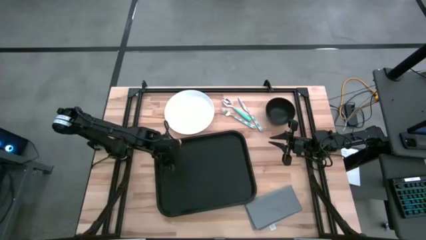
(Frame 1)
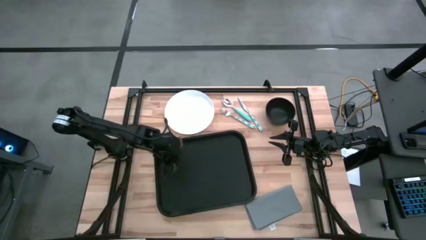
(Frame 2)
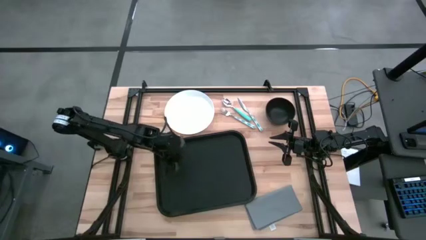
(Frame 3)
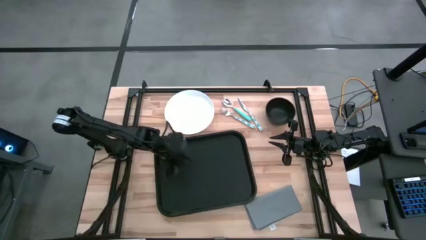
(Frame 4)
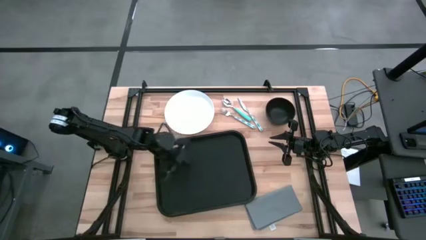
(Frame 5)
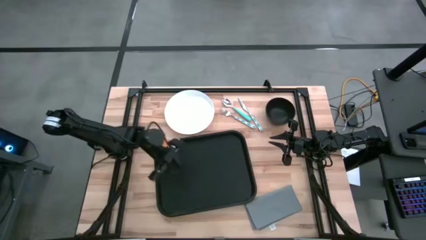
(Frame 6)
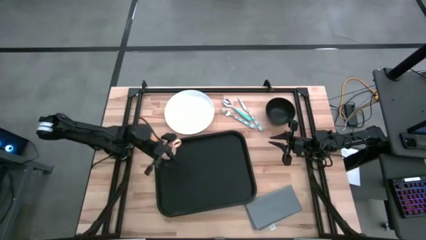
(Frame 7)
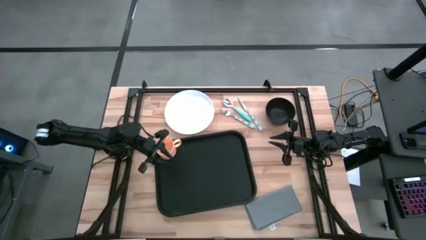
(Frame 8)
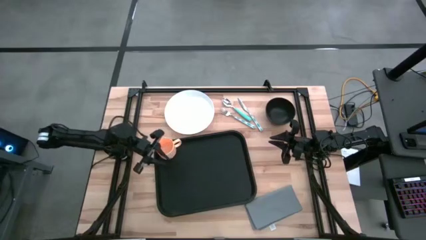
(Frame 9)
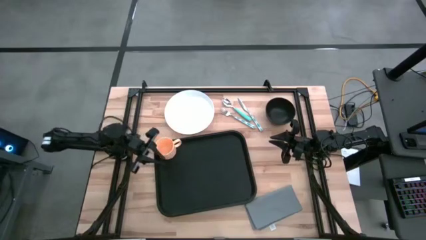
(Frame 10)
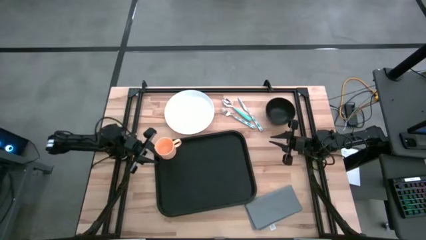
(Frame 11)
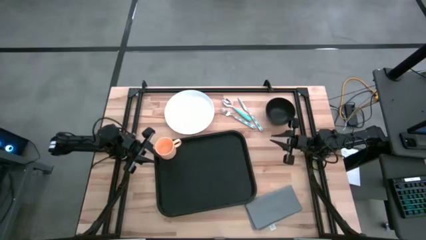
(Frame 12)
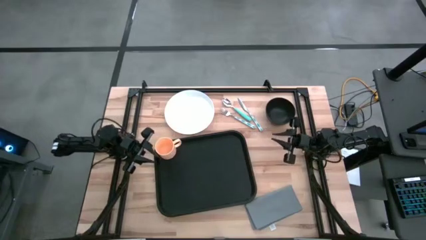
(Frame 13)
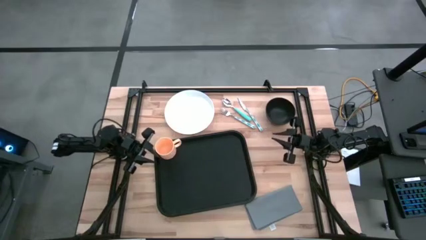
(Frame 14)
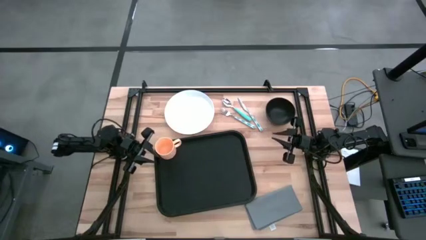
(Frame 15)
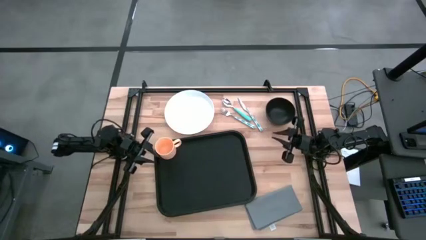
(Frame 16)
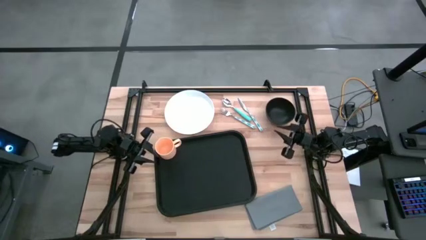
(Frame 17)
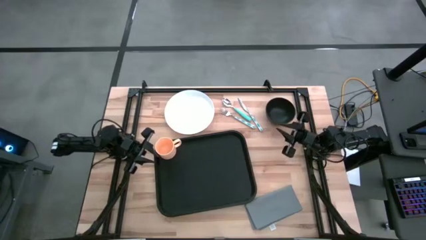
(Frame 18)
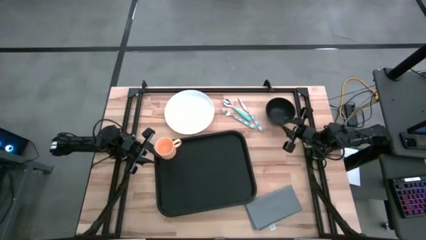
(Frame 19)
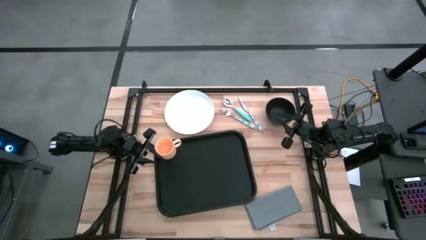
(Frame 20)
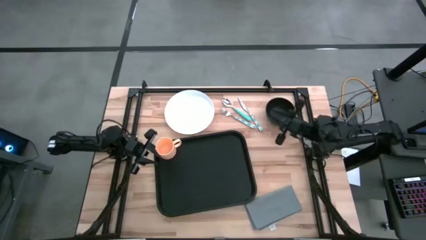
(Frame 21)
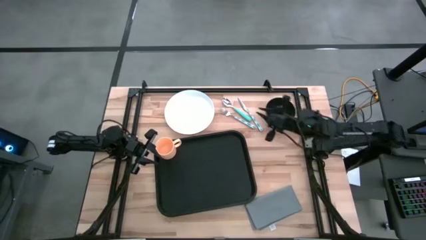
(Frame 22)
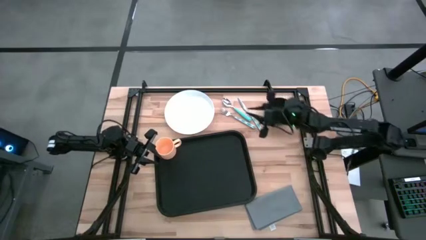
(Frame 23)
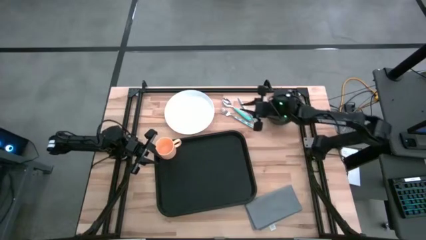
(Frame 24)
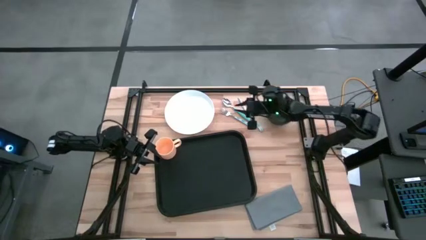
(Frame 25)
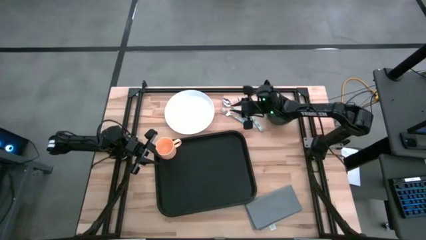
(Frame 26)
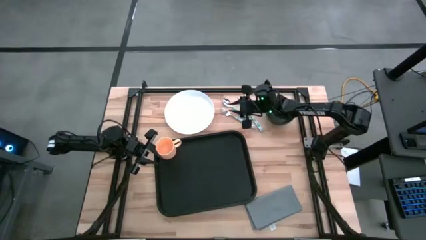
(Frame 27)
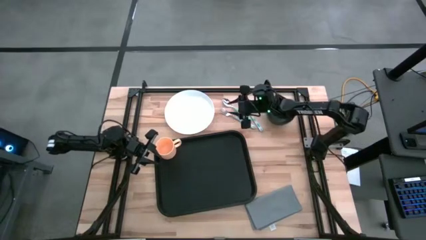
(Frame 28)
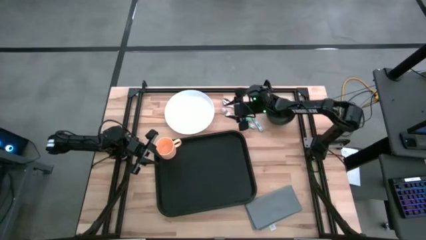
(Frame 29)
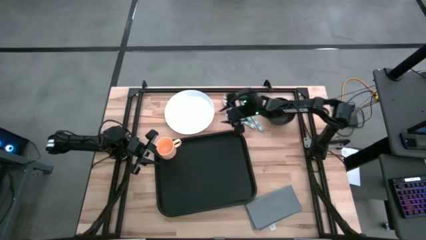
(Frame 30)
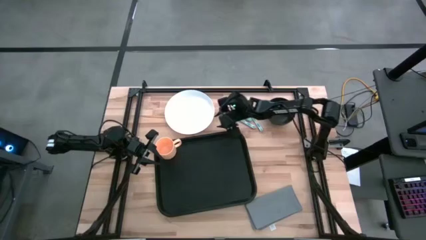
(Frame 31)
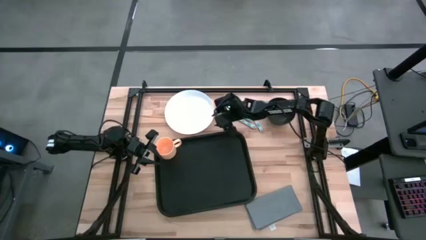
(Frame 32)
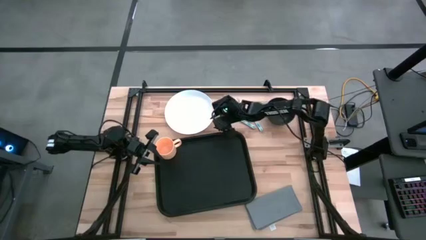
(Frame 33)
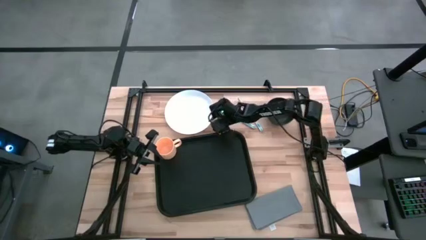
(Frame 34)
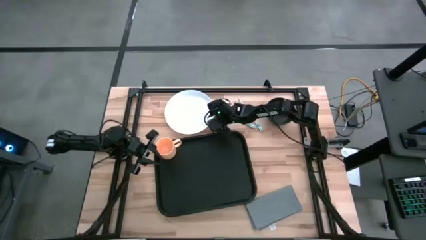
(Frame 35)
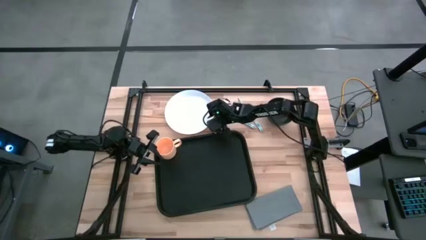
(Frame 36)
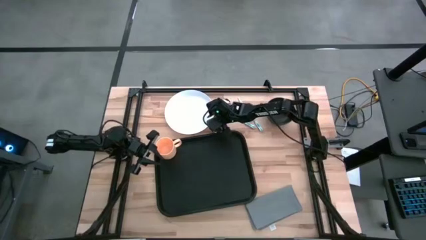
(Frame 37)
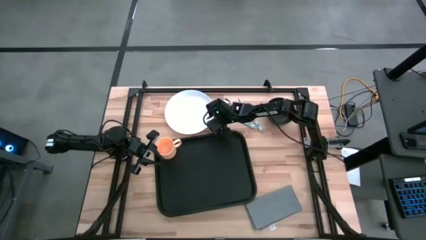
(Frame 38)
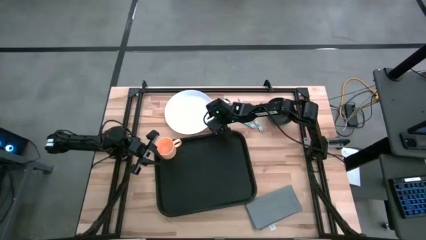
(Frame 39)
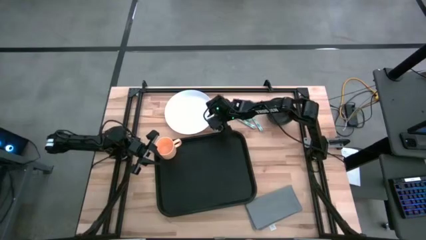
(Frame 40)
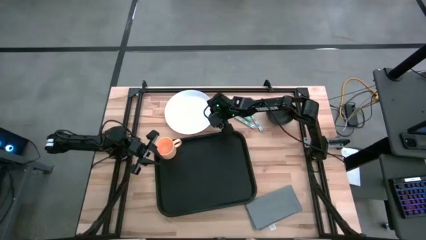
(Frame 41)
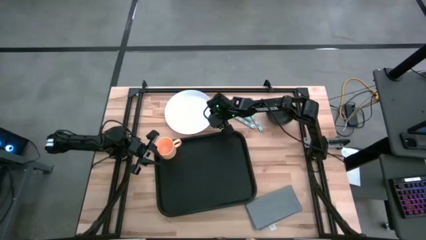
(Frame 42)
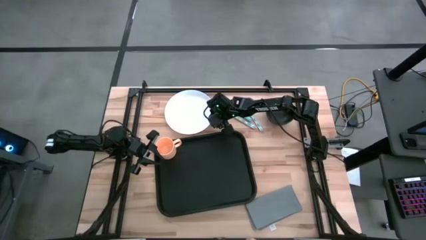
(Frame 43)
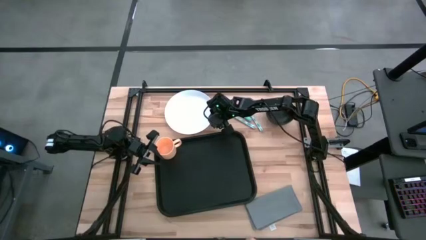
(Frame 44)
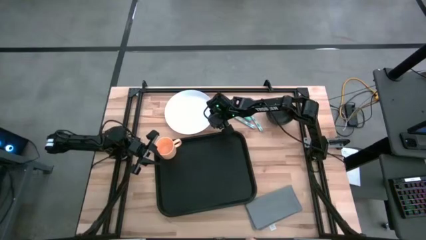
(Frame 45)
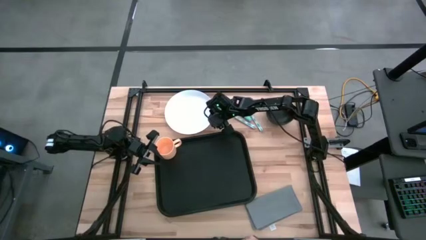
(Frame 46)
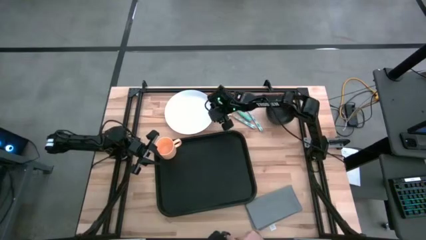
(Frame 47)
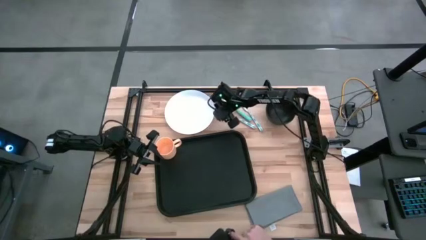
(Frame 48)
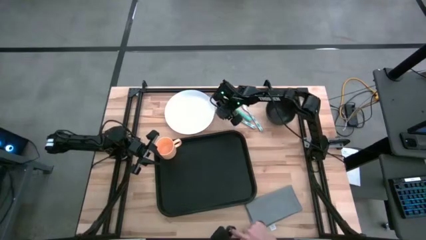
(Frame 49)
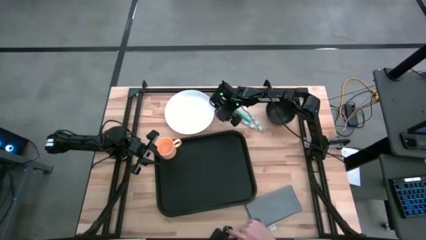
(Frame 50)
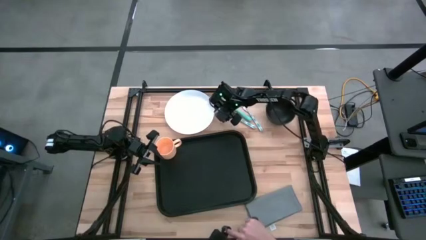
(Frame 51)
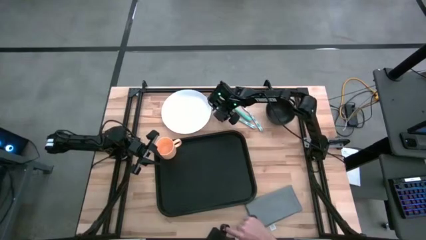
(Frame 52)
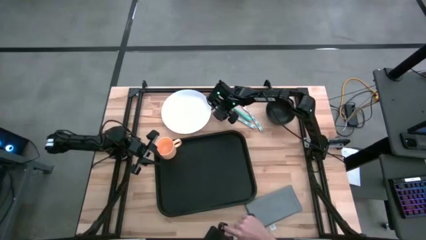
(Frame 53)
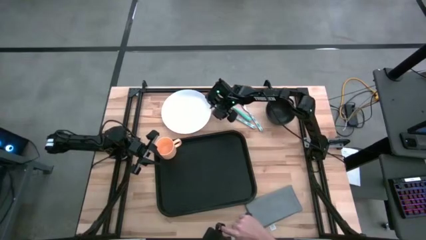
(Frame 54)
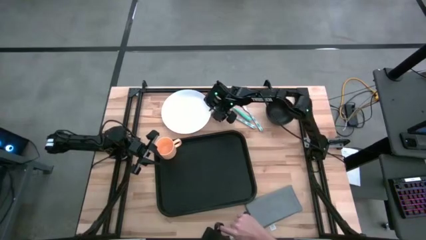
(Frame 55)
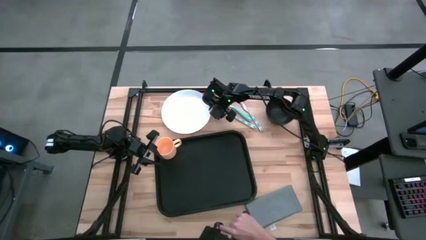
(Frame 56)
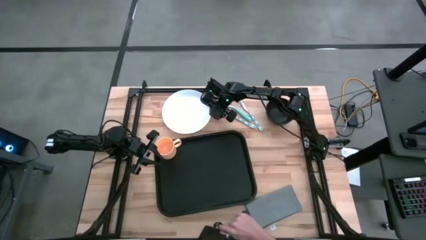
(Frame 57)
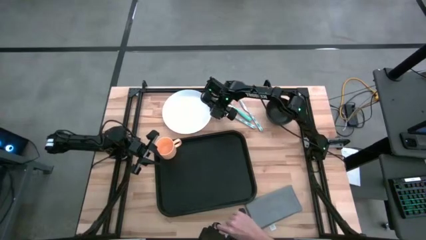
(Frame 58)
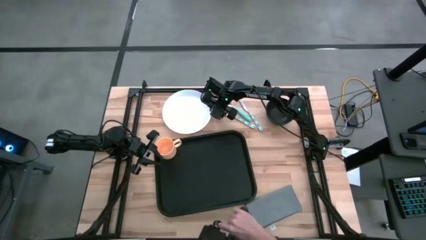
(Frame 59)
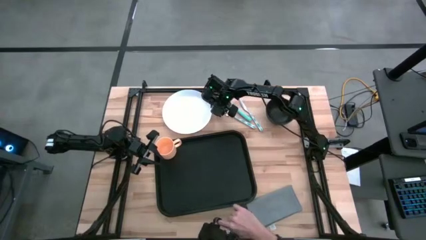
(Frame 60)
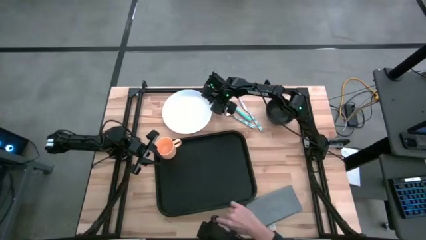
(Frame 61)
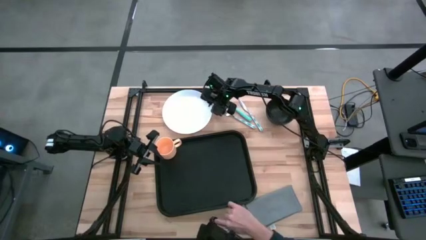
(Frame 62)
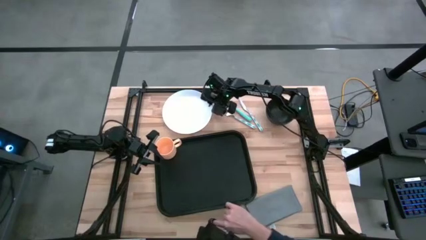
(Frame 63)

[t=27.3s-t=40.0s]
Task: Set up tray
Put the white plate on the black tray to the bottom right of the orange mug
